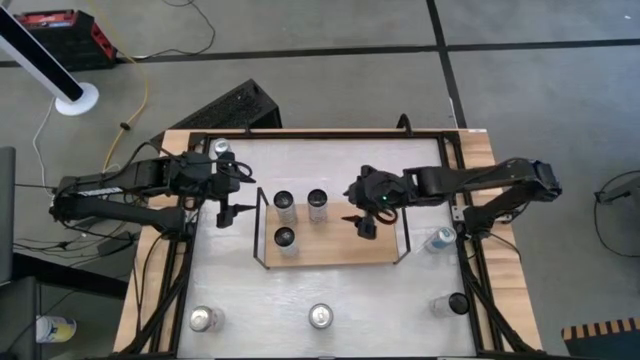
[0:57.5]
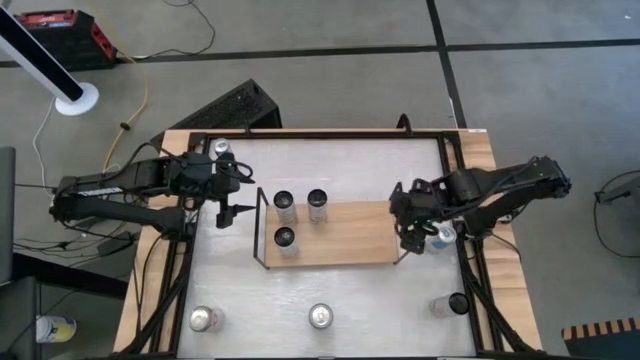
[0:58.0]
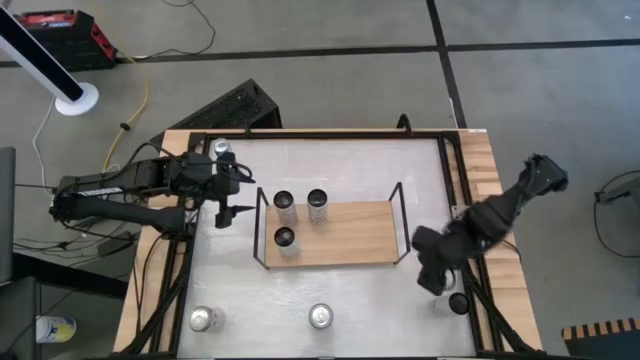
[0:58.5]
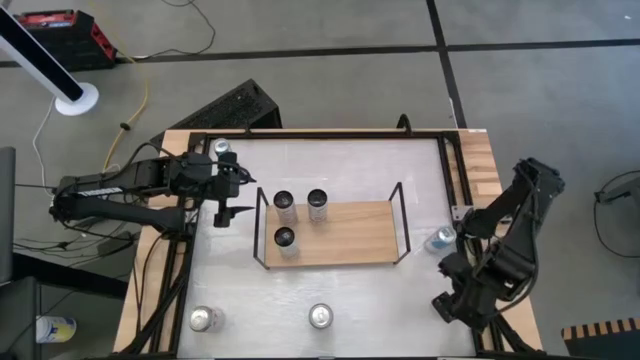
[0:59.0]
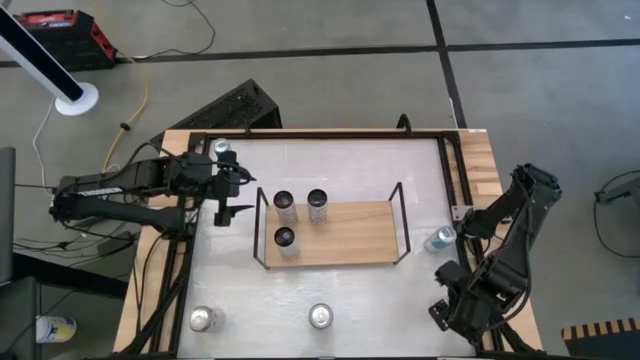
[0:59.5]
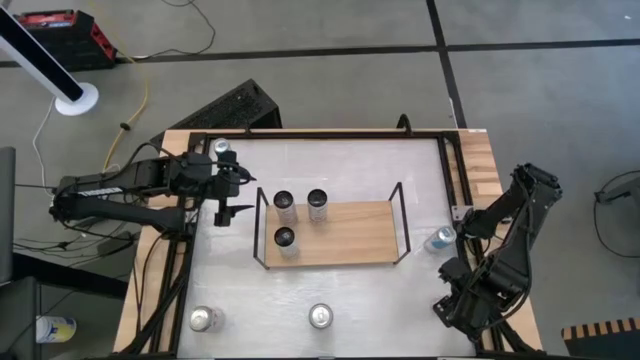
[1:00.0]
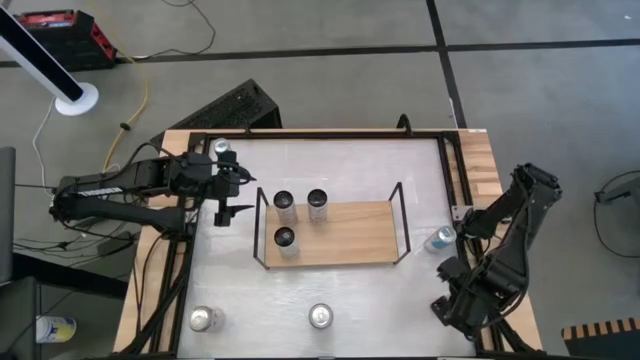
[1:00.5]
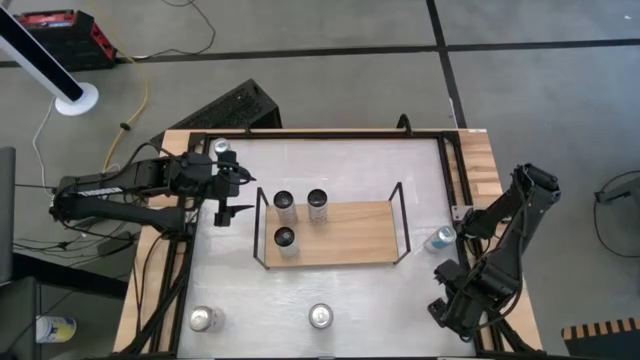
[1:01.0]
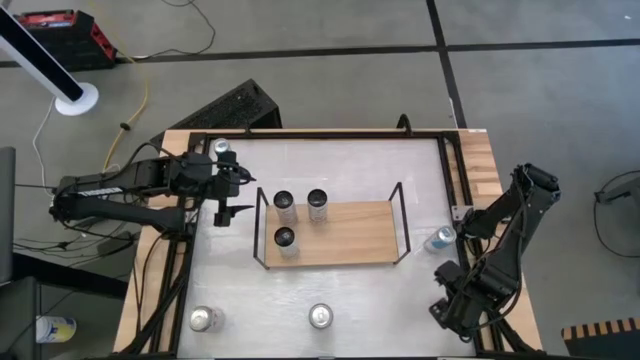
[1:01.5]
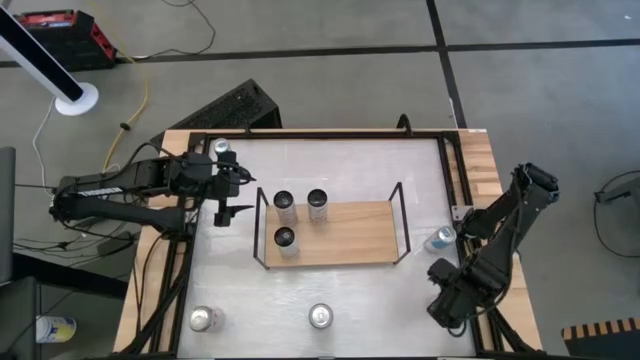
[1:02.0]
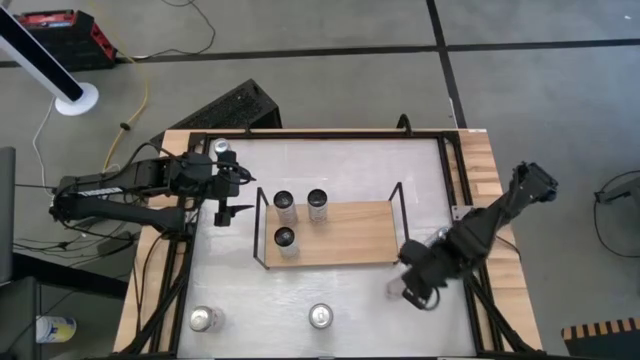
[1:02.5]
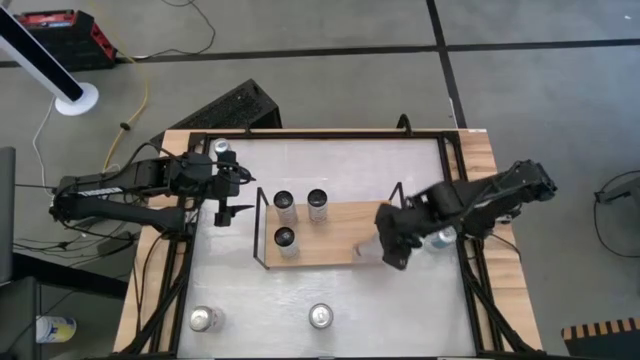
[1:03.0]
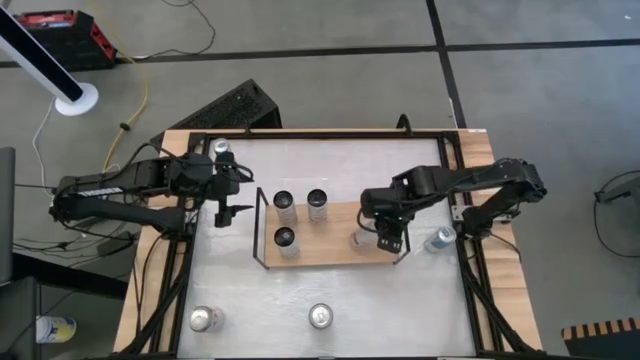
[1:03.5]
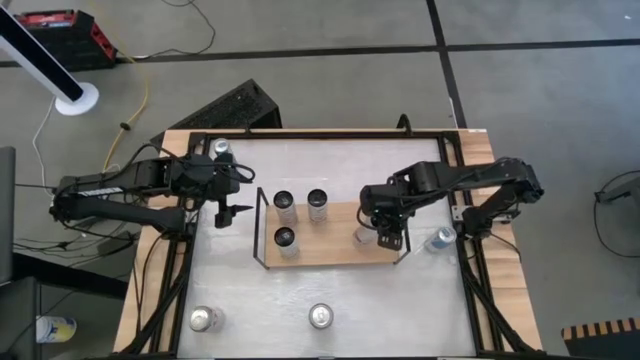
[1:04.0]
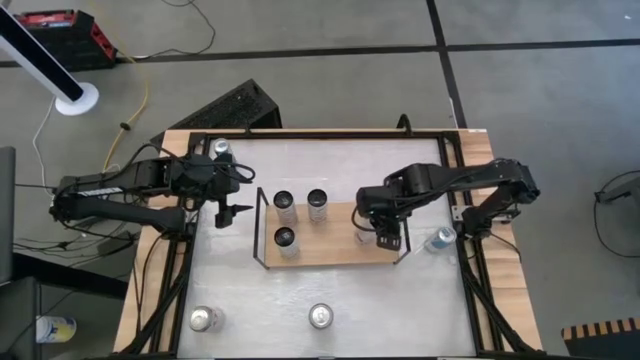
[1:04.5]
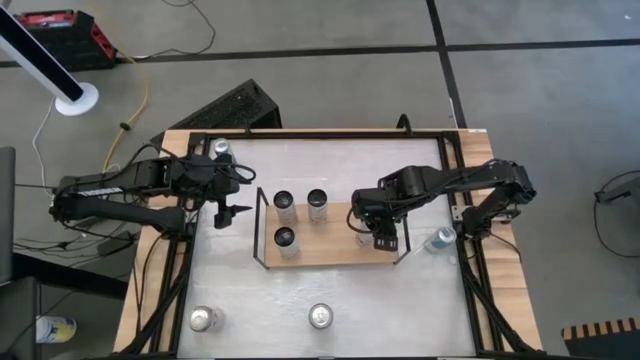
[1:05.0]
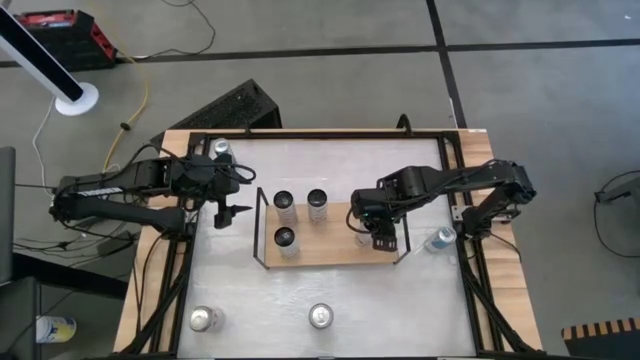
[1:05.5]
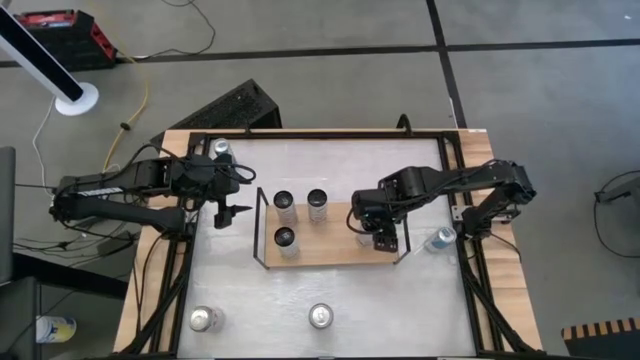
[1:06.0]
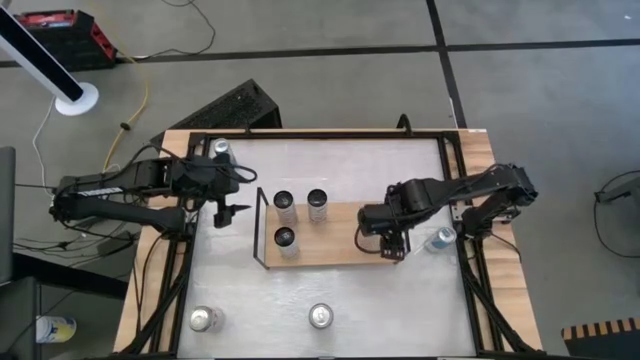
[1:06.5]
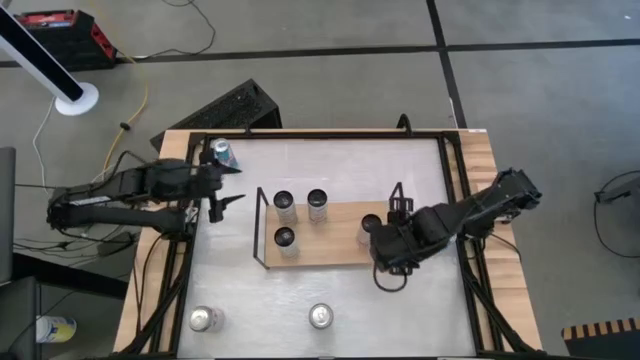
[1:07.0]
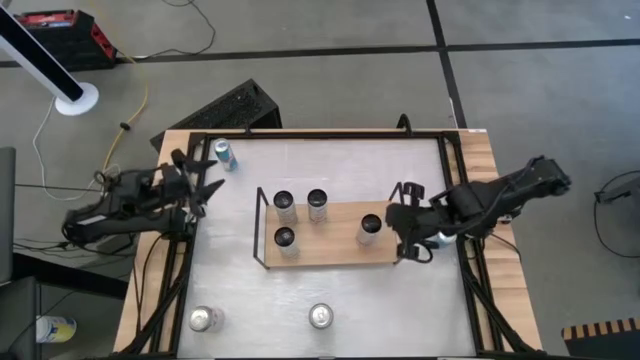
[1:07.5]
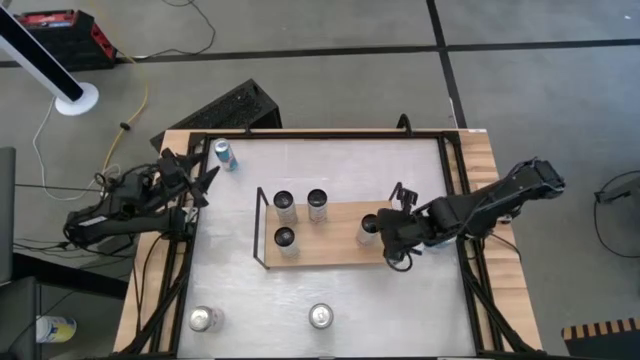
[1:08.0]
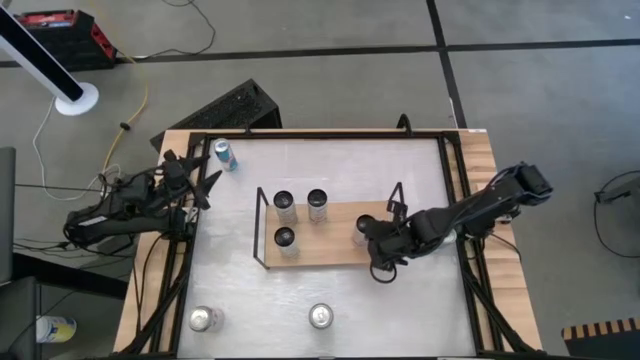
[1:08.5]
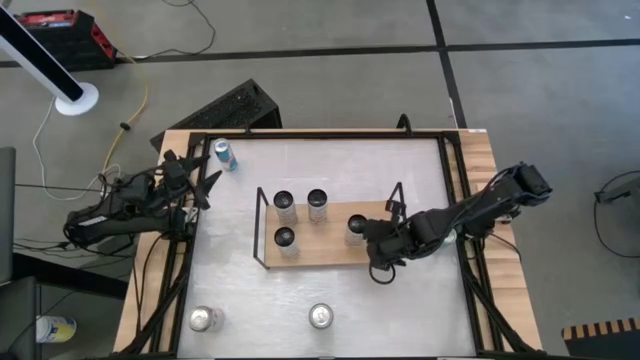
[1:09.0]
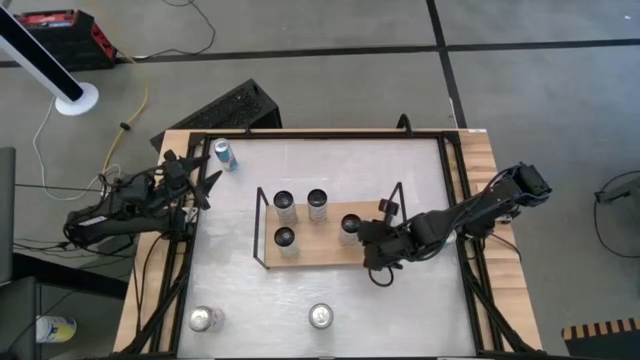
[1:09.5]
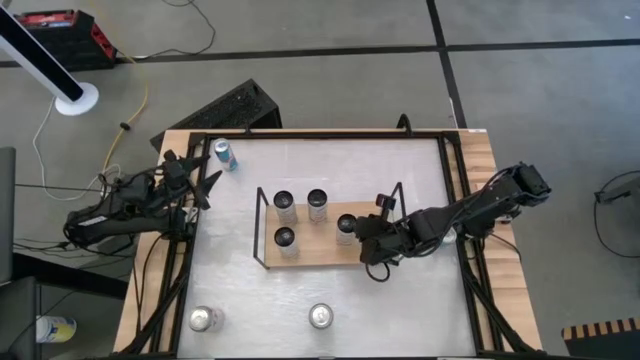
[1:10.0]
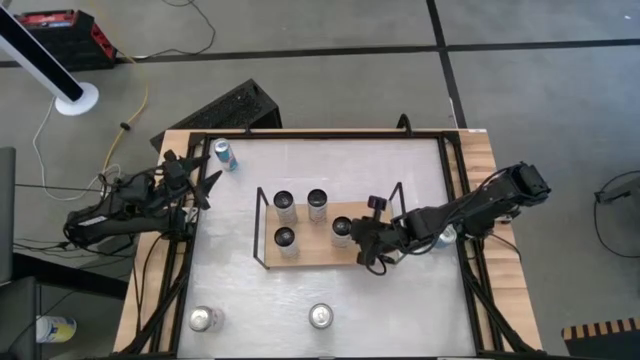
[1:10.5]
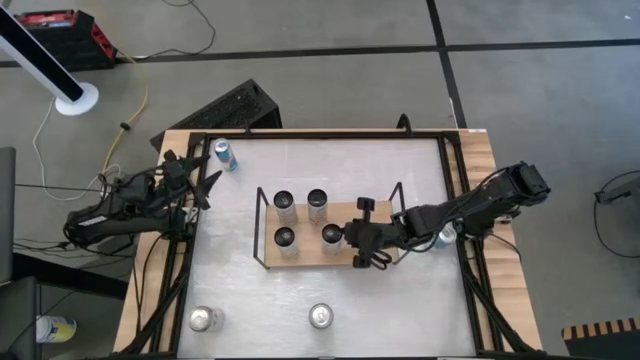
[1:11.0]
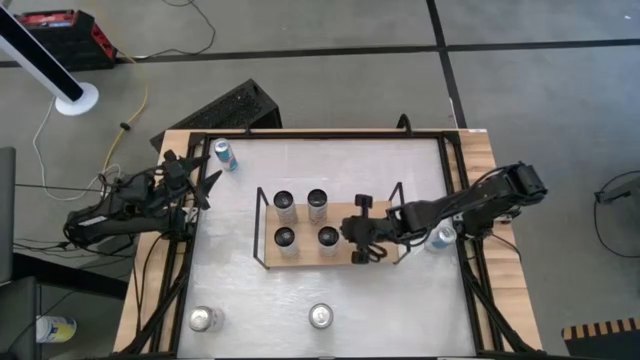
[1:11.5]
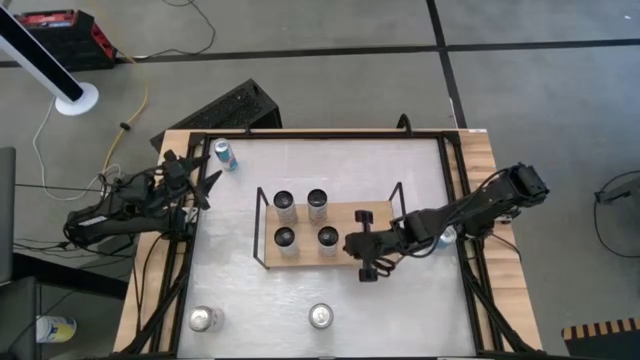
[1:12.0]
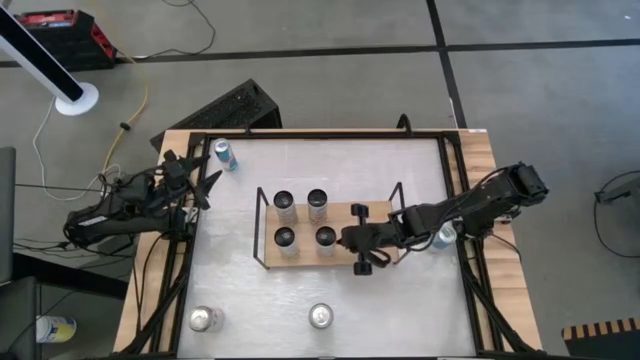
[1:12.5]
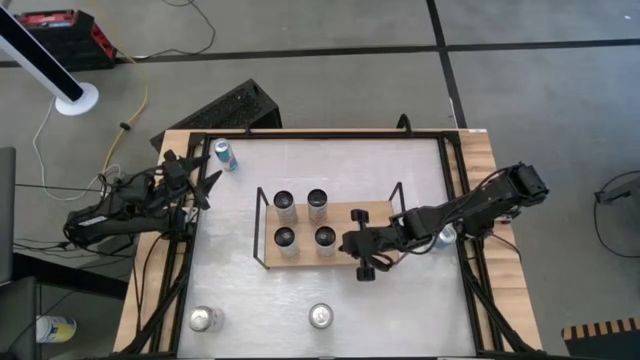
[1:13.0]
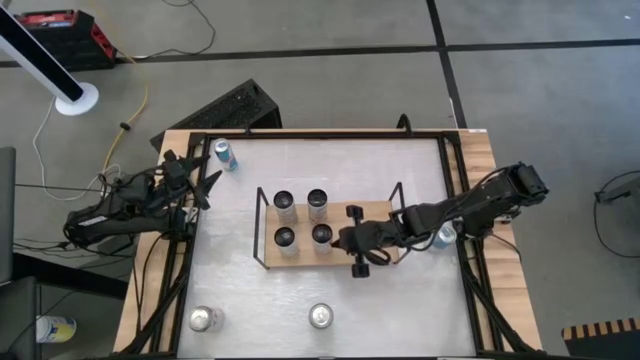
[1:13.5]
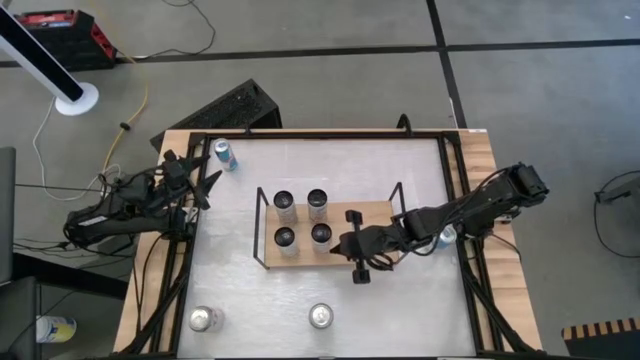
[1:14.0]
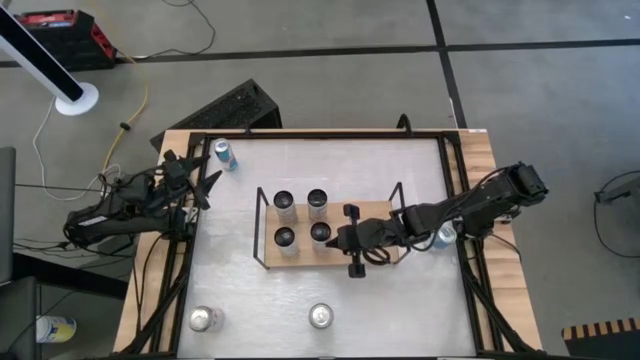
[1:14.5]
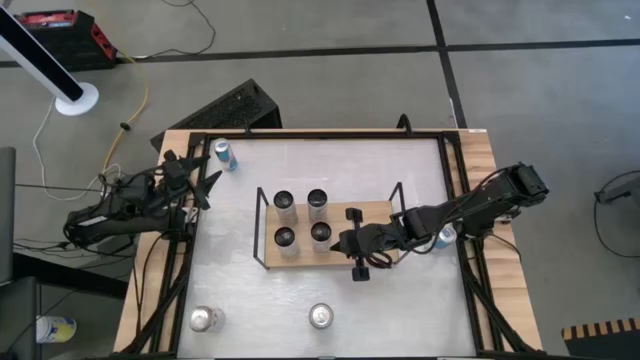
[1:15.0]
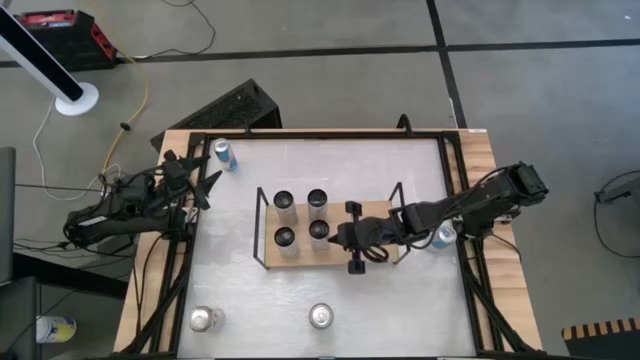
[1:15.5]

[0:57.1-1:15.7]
Task: Place canned beverage on shelf
Put the white-pink soda can on the shelf aligned with the other white-pink soda can

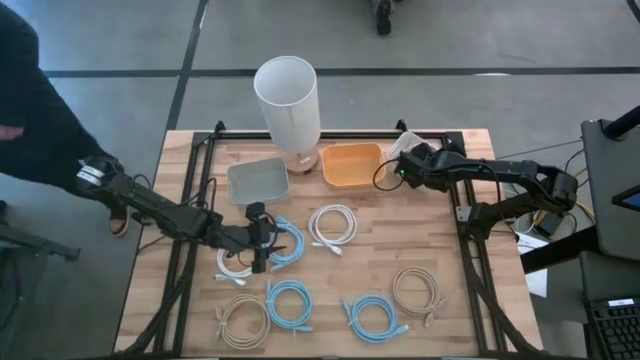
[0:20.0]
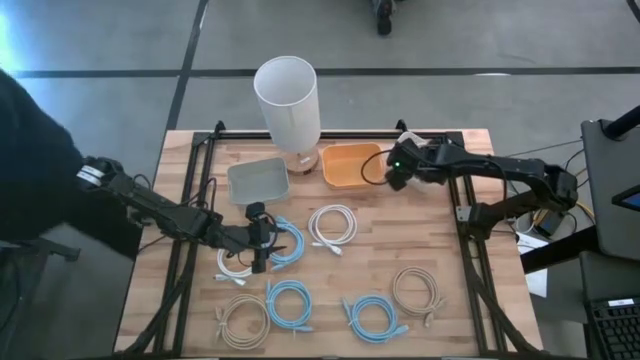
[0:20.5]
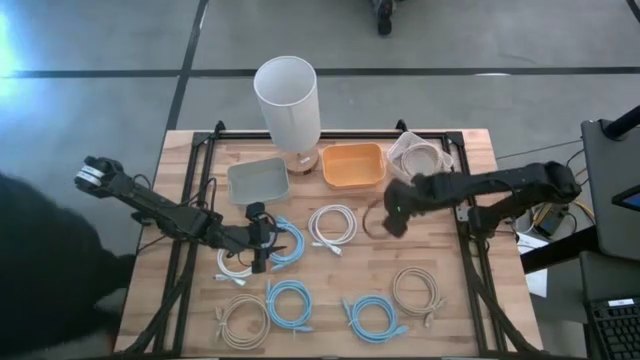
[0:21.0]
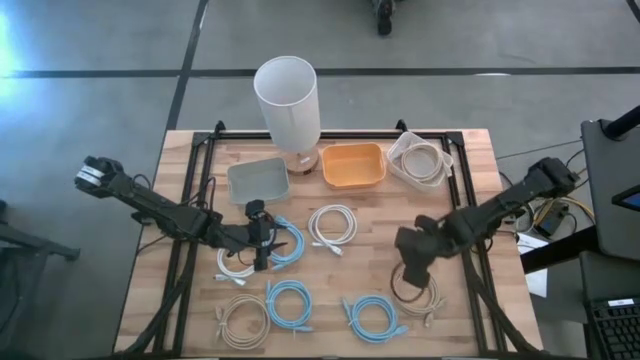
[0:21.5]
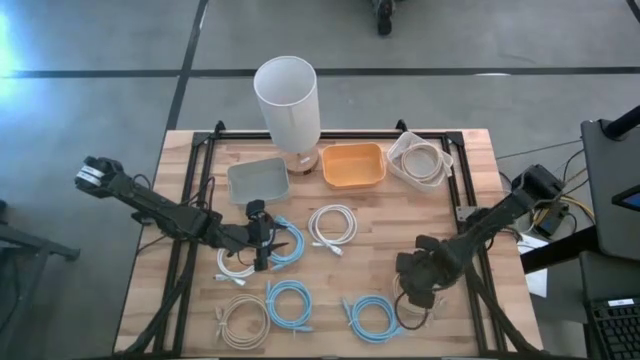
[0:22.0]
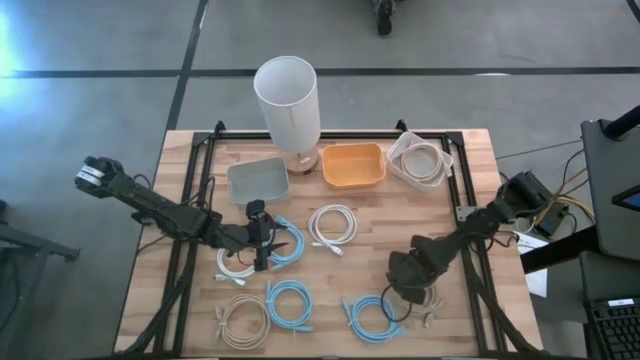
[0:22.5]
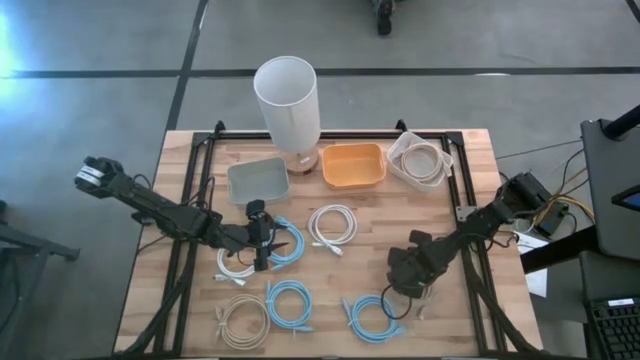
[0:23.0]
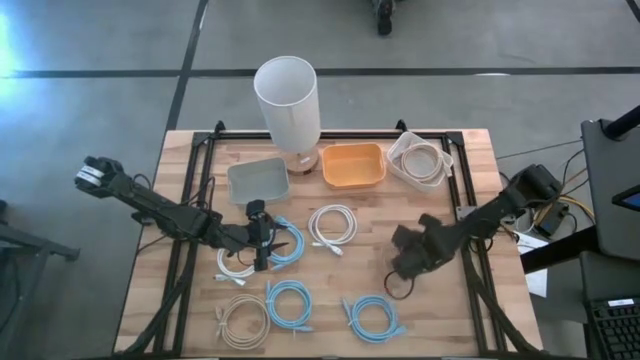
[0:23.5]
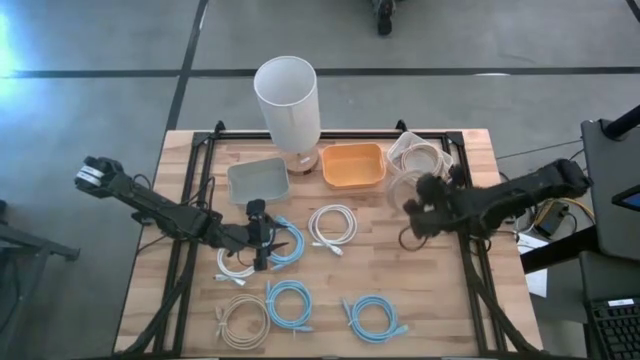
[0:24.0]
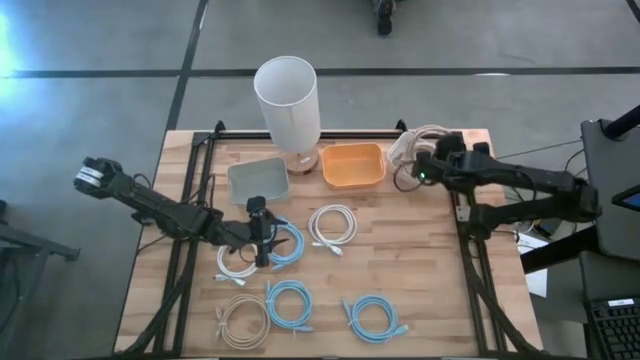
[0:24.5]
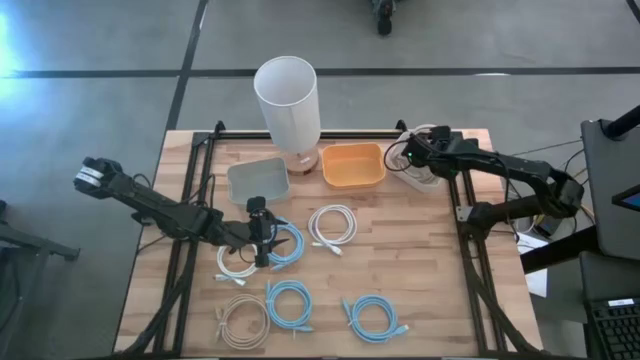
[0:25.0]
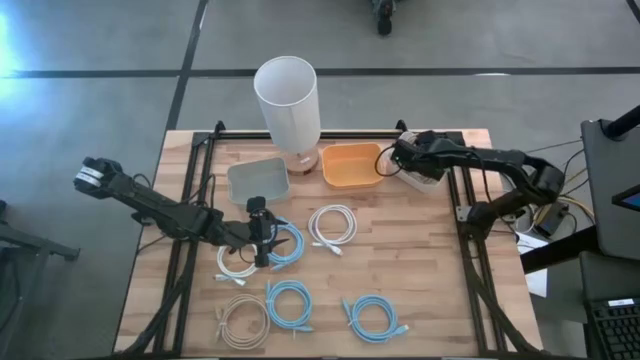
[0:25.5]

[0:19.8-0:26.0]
Task: Sort HDMI cables
Put the brown HDMI cable into the white bin
